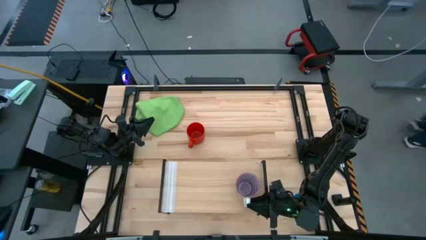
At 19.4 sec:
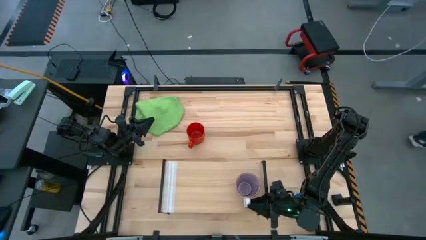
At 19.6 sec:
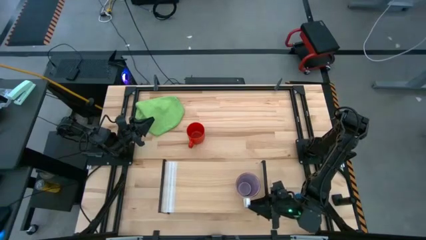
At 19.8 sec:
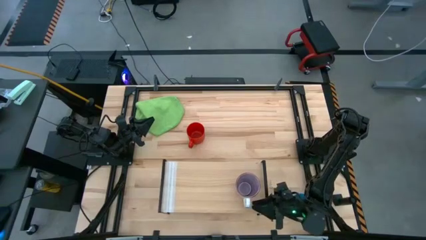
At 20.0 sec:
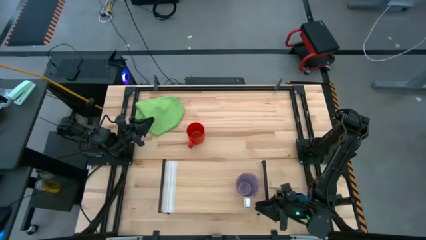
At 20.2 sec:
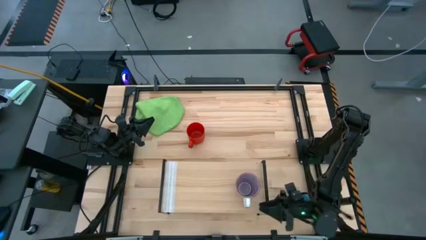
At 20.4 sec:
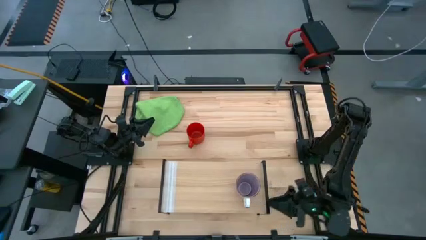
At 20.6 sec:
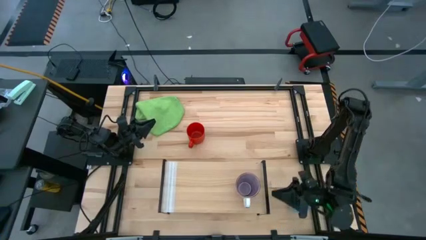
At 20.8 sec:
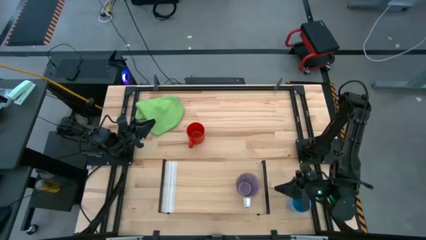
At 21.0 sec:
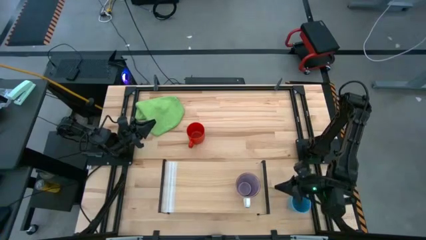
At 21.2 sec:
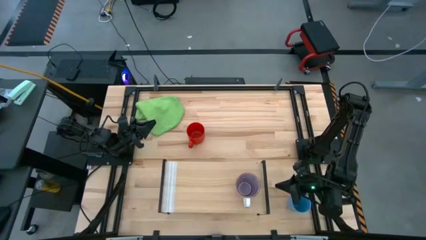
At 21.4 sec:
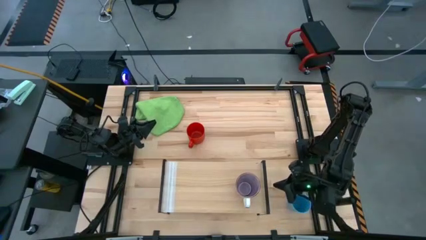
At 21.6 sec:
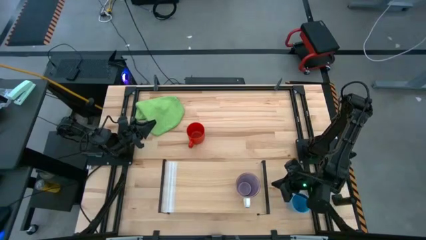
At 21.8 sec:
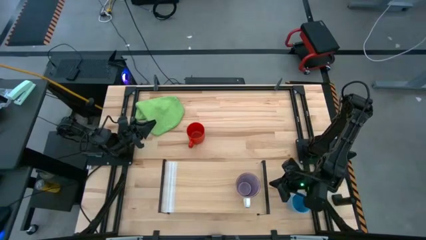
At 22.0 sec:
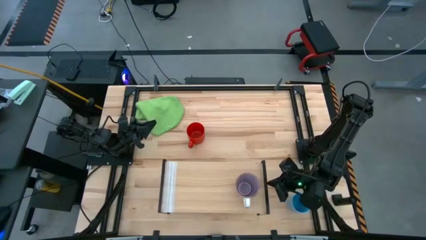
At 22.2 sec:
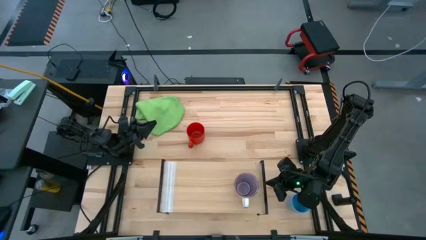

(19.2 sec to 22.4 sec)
Task: Stack small to large cups/mugs on shelf
Adjust the shelf

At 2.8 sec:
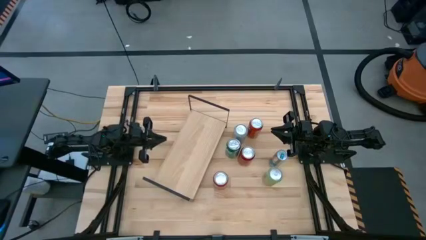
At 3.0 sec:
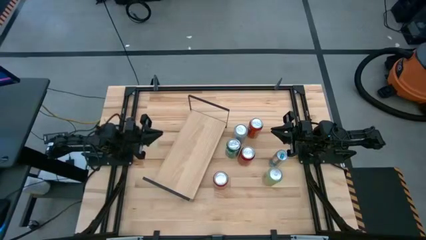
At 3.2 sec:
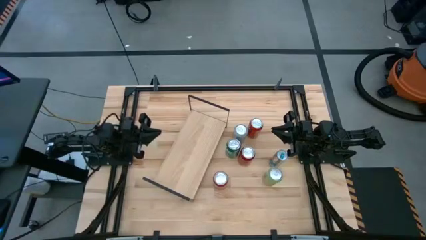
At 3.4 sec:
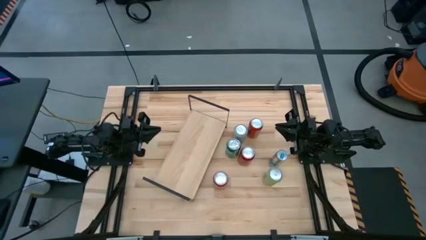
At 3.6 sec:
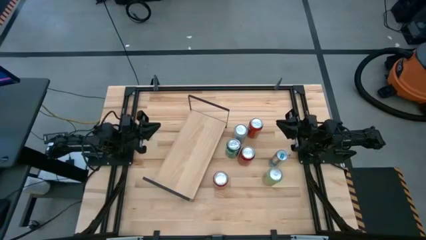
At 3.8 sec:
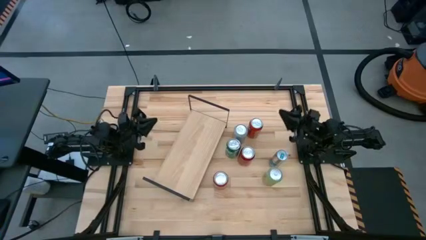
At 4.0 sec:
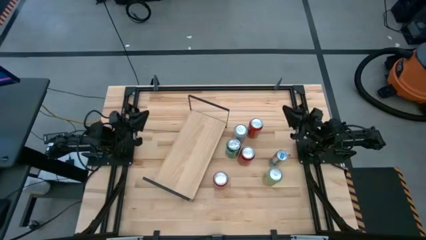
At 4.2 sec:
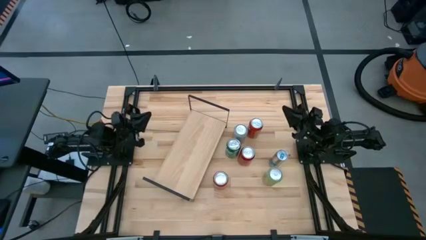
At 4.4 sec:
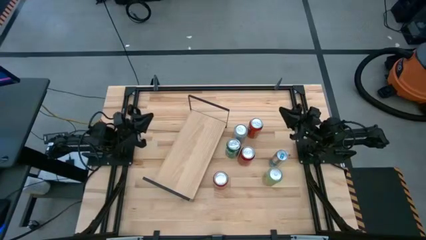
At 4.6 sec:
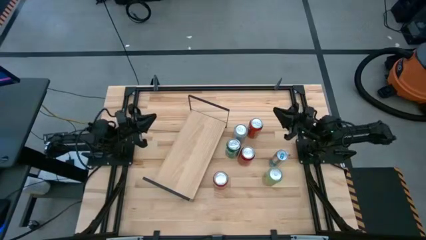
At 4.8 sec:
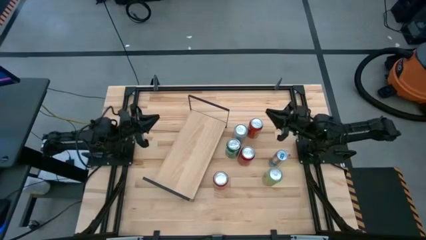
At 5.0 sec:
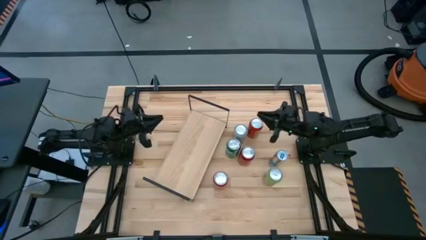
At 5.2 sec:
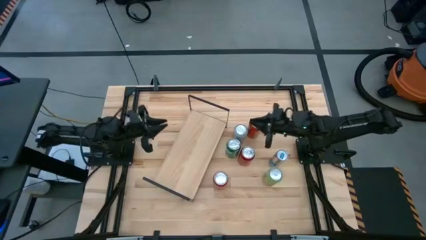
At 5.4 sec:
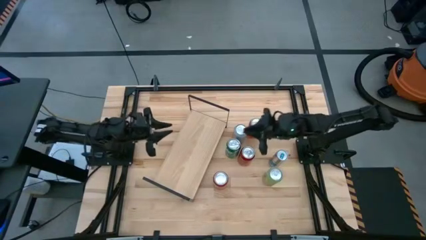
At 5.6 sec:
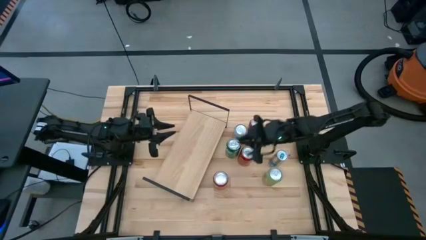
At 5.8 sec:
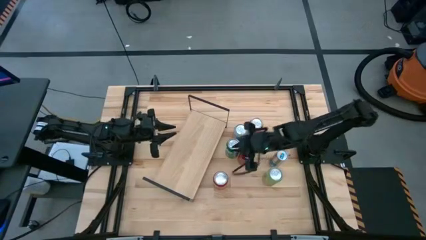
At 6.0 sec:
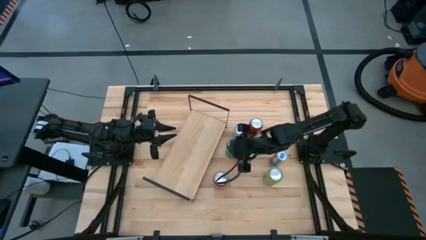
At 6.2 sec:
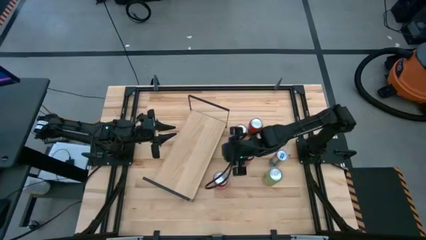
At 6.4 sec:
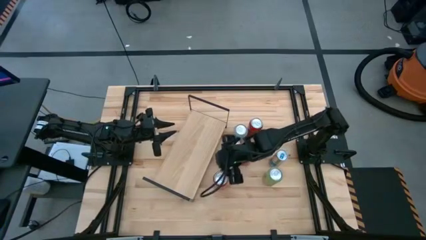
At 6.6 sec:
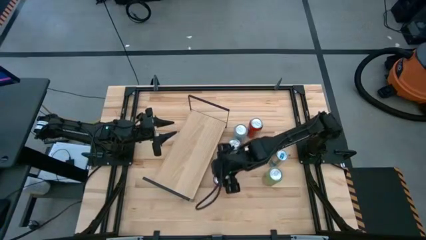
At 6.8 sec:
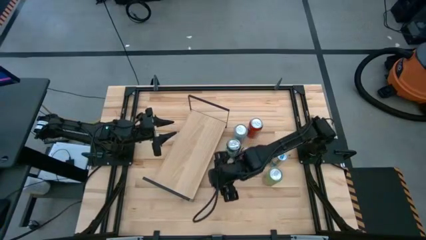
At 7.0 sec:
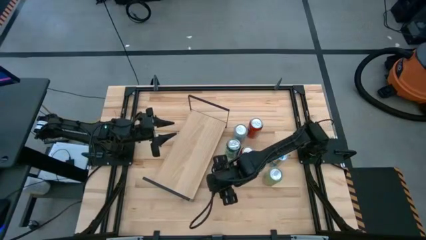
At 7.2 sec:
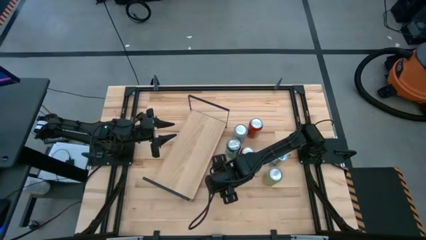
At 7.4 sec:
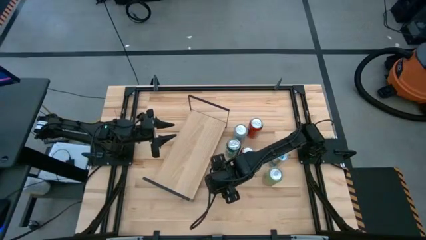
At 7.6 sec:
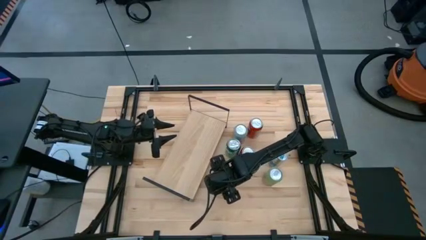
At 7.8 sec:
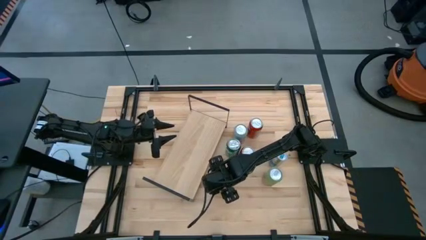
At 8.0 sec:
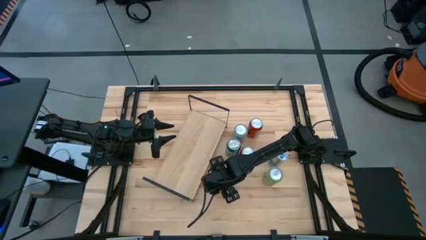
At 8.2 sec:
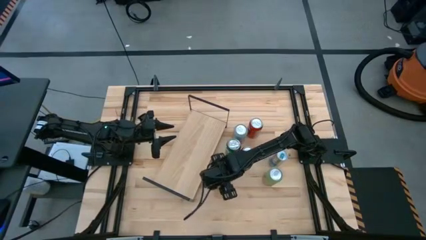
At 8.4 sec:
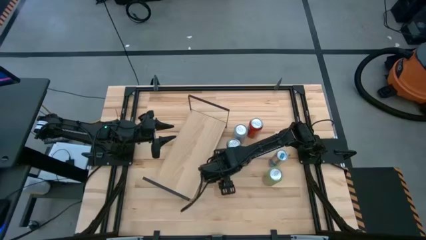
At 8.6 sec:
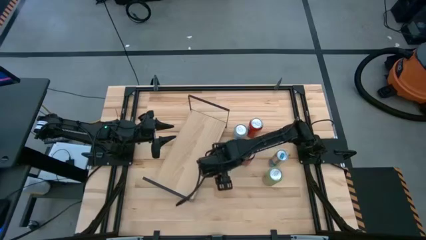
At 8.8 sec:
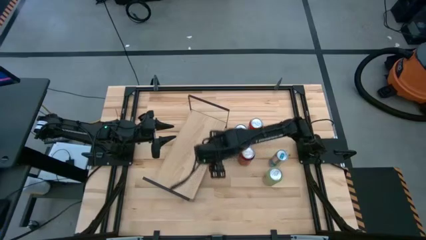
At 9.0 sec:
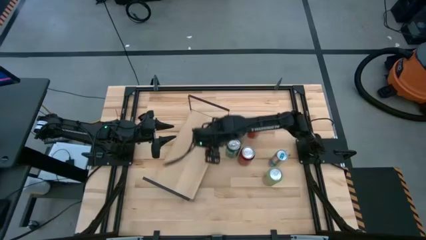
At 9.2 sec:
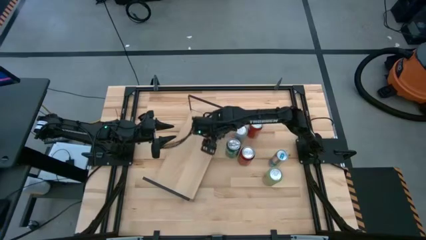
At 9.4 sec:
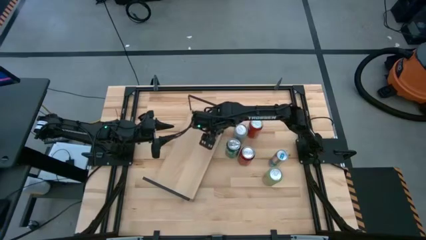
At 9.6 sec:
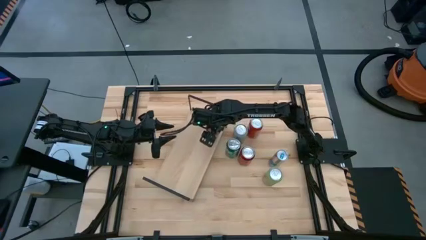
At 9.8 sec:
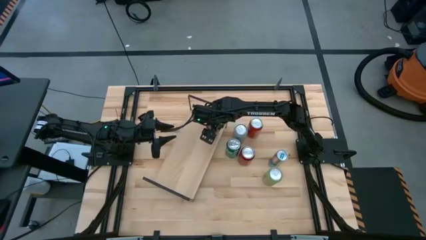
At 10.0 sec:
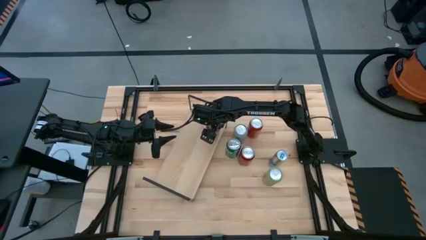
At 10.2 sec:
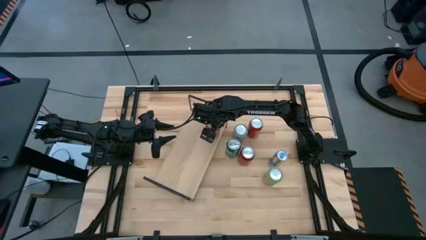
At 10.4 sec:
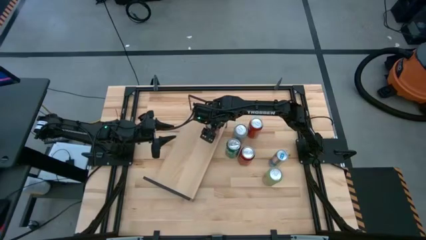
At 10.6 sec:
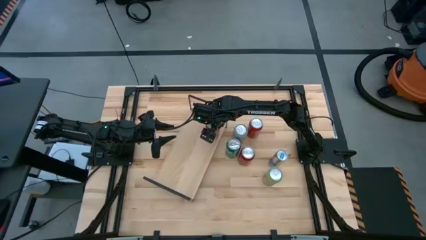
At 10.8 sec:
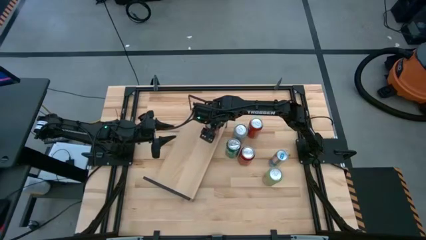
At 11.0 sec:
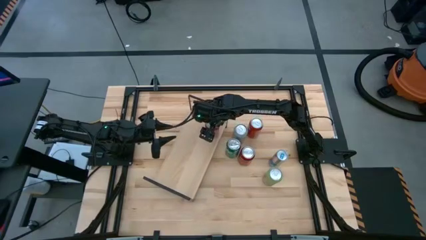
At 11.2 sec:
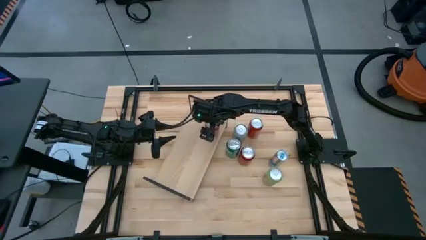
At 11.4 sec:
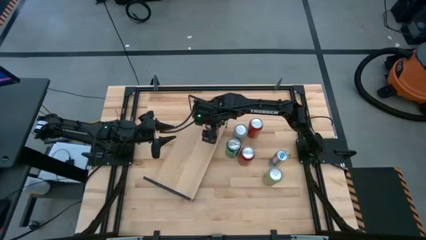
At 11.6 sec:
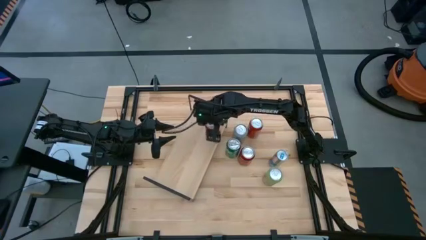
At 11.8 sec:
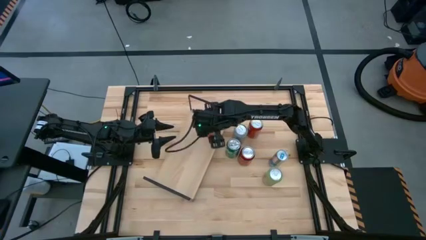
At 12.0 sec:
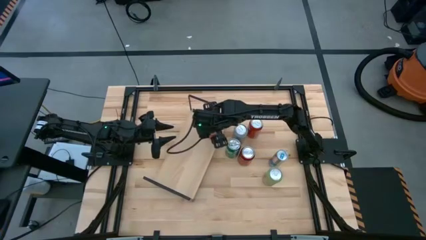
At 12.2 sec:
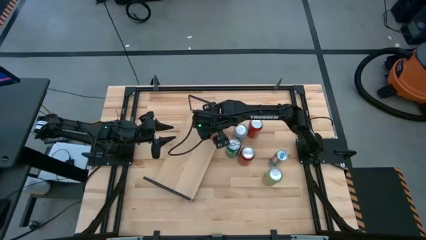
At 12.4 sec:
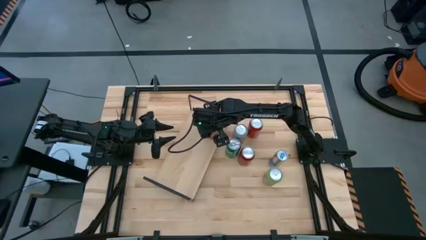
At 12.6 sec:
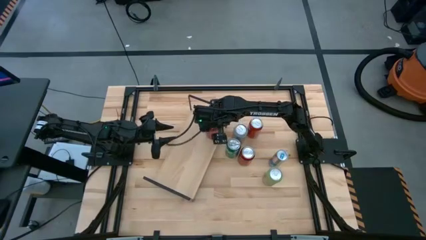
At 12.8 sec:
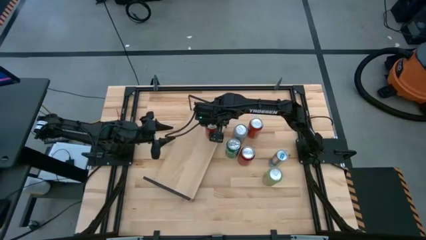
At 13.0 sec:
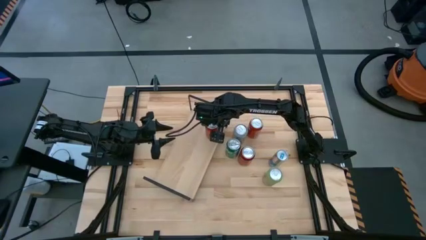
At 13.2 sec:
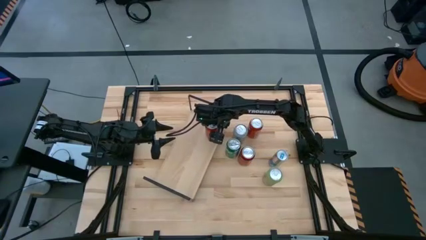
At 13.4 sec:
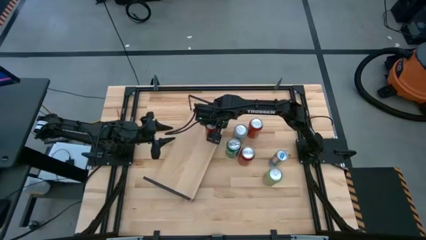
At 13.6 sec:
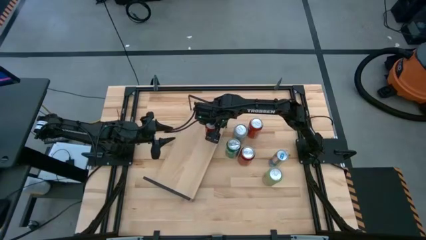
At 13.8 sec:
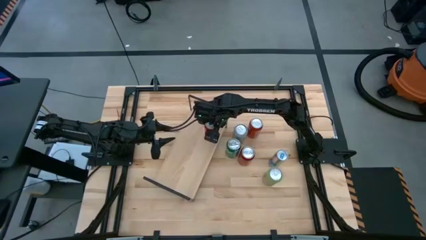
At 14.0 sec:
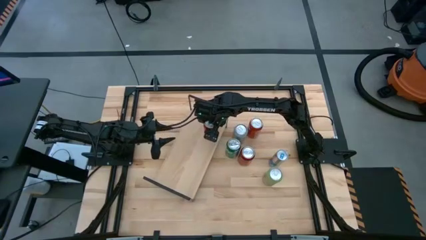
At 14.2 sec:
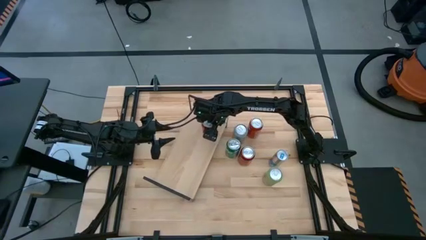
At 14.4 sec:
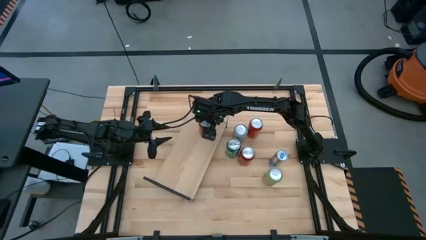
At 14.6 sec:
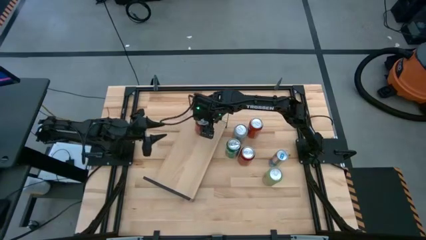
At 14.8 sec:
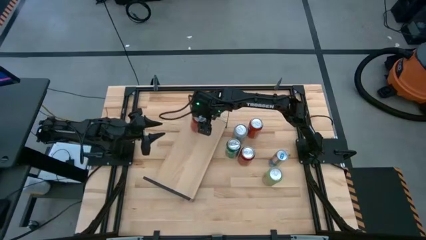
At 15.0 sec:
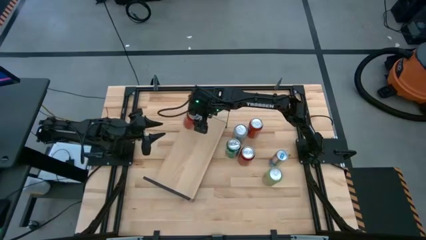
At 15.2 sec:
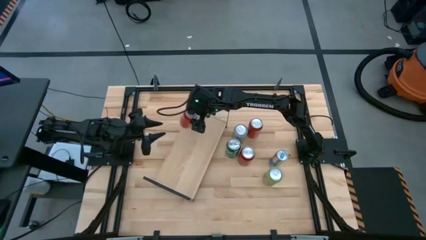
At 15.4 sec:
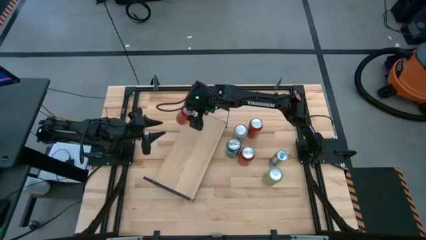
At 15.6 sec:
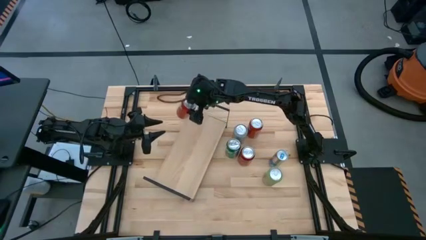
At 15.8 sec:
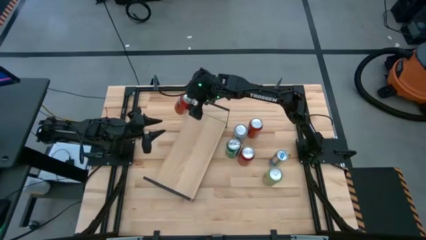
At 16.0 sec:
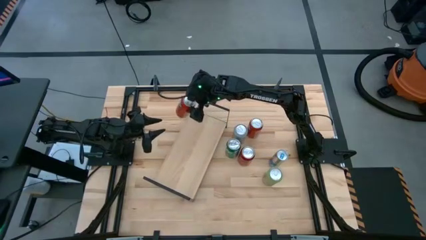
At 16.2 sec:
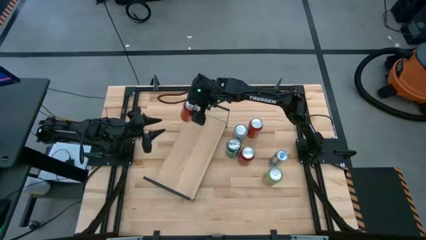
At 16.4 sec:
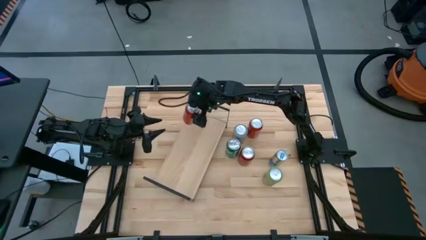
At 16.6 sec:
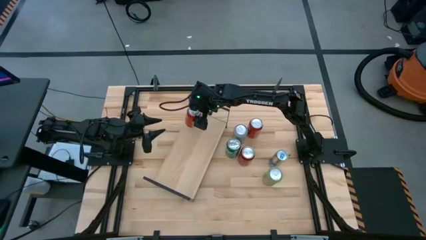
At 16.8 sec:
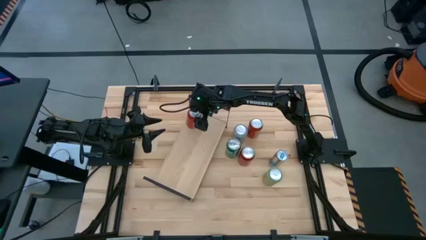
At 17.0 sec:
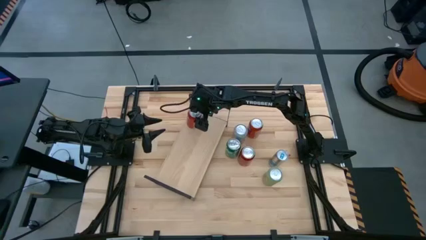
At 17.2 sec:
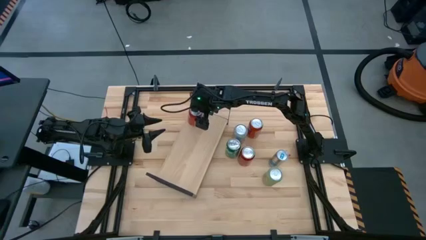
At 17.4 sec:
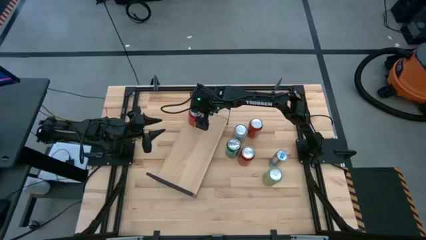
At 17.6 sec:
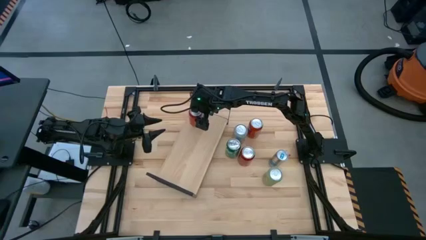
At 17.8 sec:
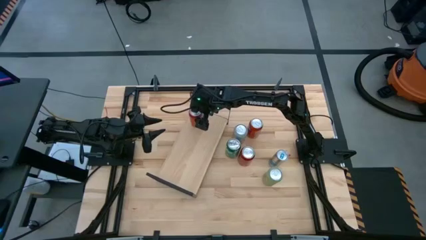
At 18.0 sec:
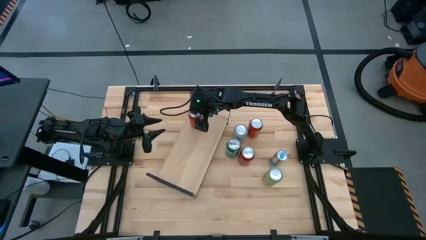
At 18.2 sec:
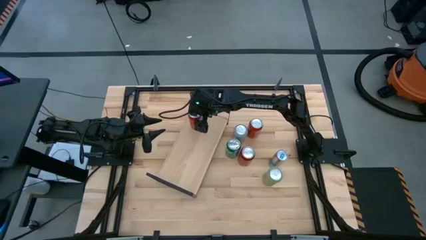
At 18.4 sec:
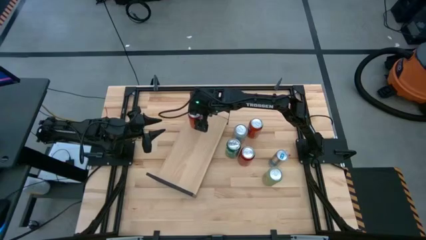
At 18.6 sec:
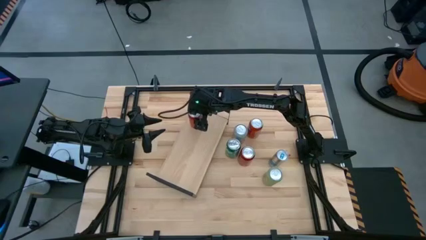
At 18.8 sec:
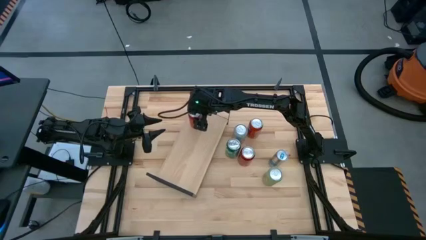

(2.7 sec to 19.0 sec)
Task: Place canned beverage on shelf
Put the orange soda can on the shelf
